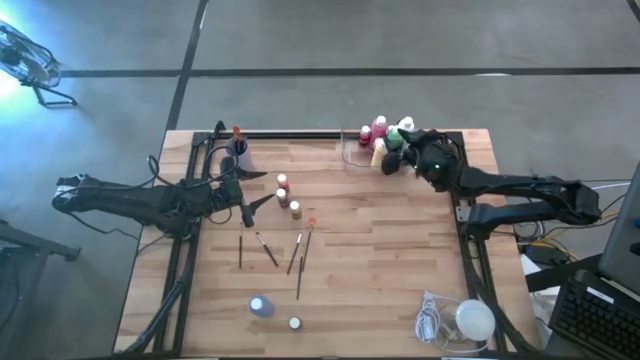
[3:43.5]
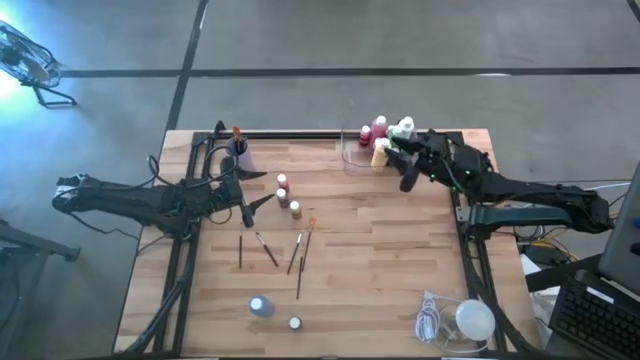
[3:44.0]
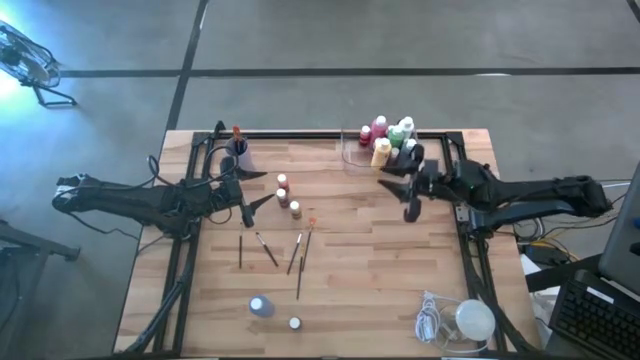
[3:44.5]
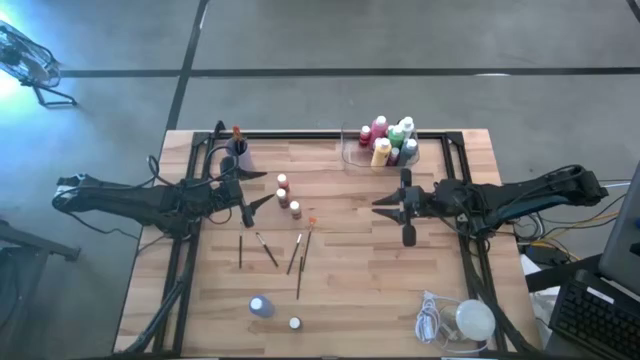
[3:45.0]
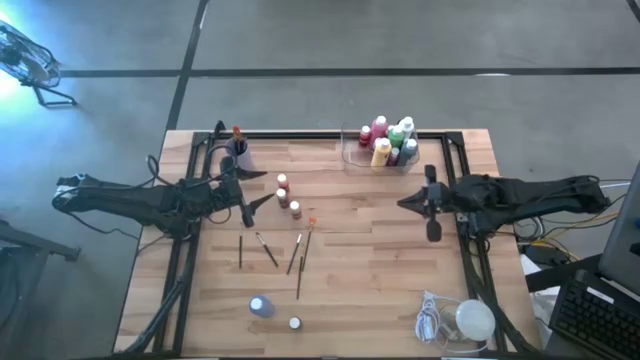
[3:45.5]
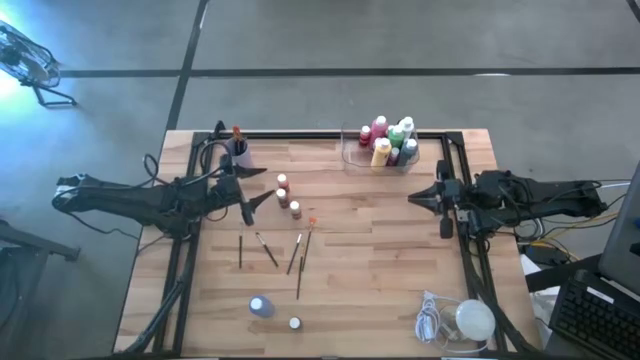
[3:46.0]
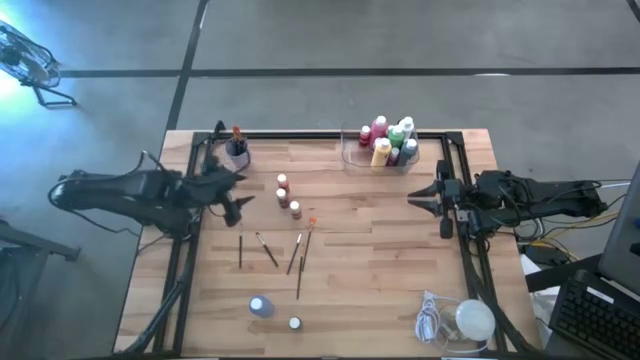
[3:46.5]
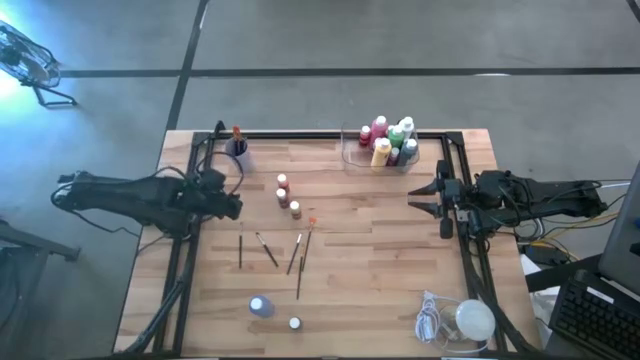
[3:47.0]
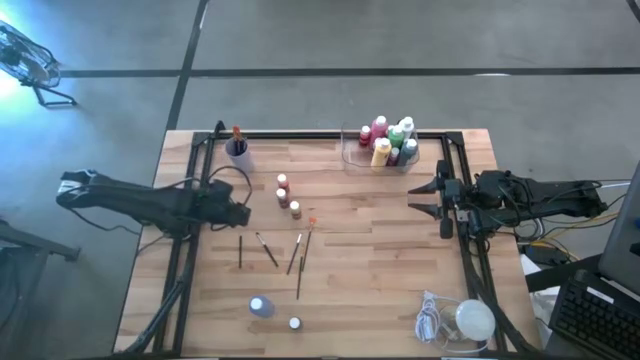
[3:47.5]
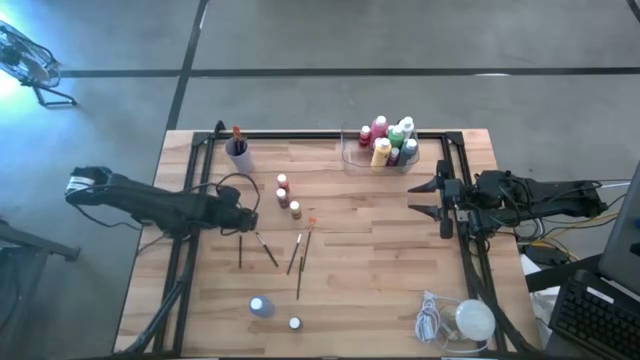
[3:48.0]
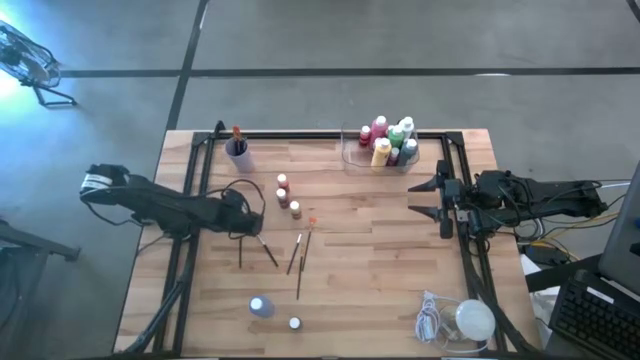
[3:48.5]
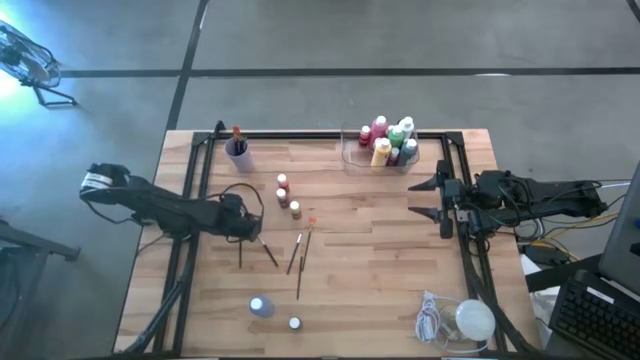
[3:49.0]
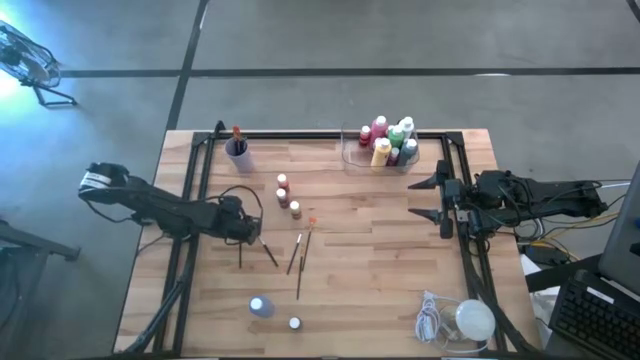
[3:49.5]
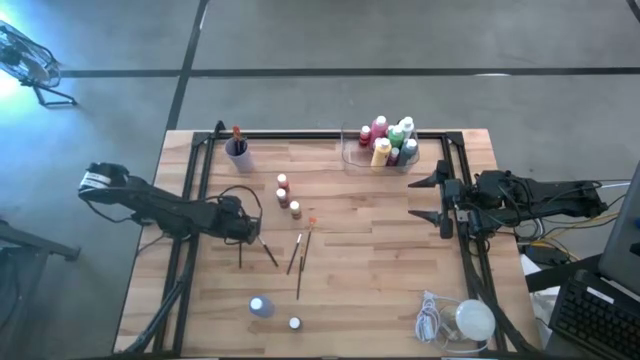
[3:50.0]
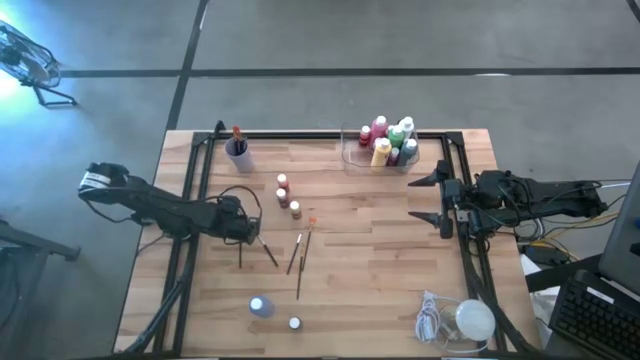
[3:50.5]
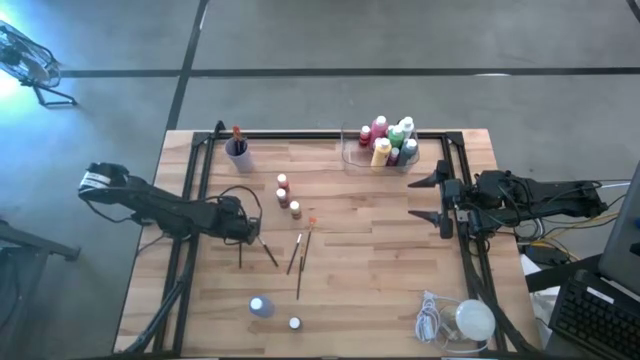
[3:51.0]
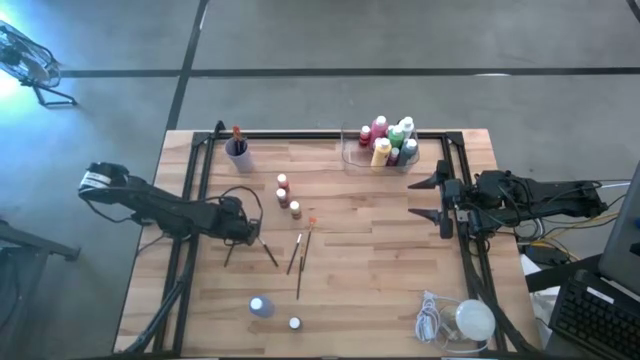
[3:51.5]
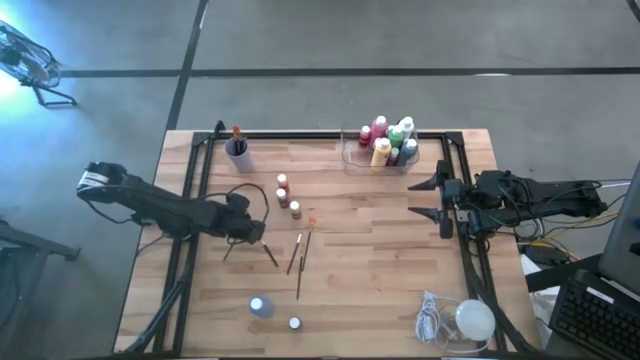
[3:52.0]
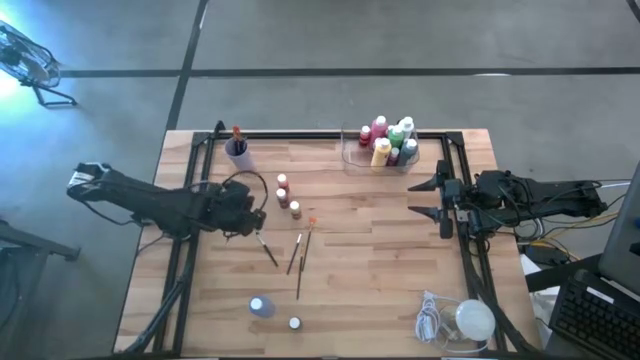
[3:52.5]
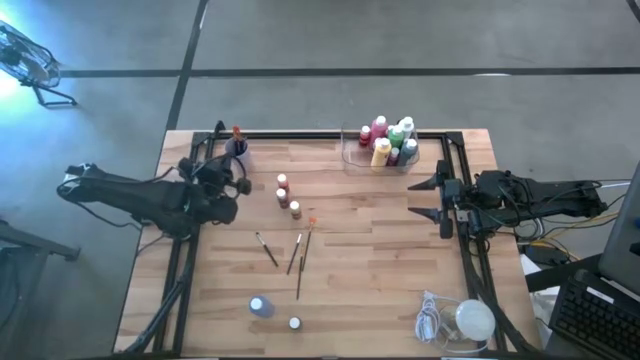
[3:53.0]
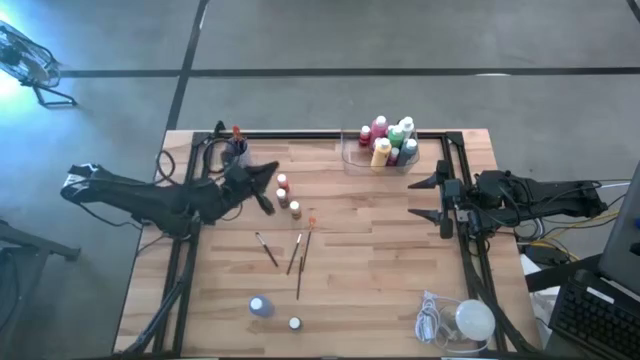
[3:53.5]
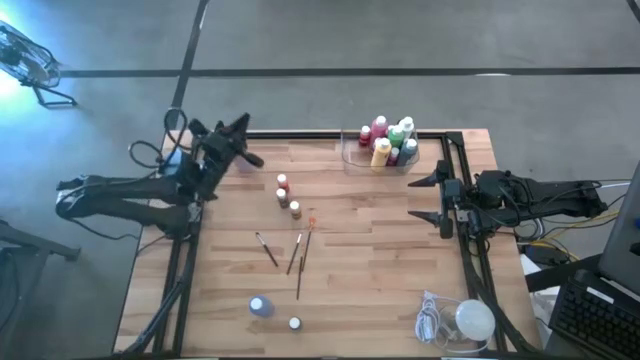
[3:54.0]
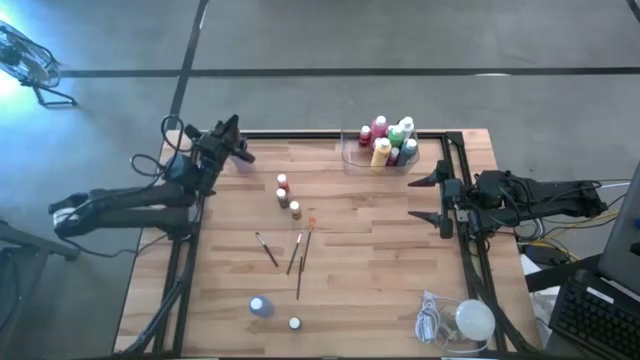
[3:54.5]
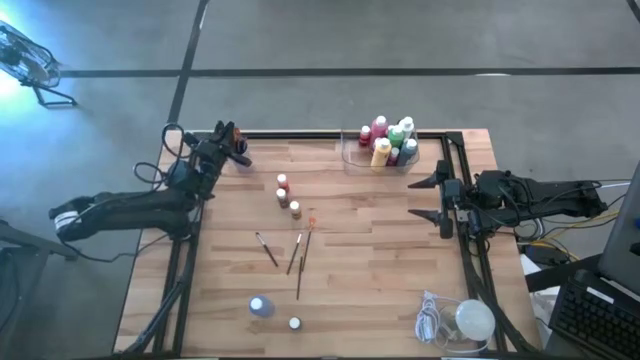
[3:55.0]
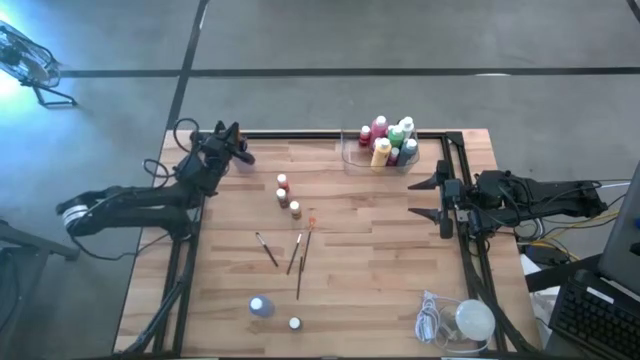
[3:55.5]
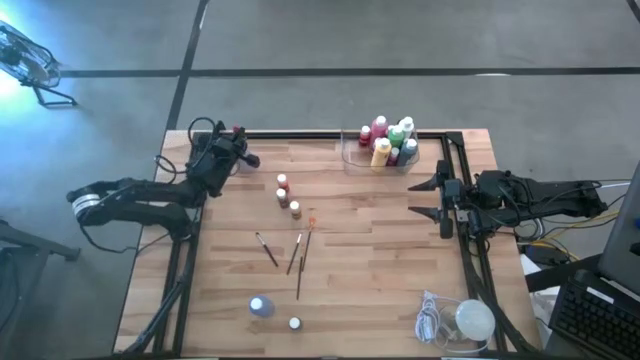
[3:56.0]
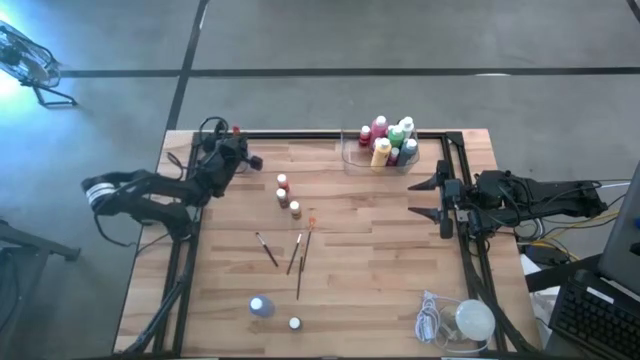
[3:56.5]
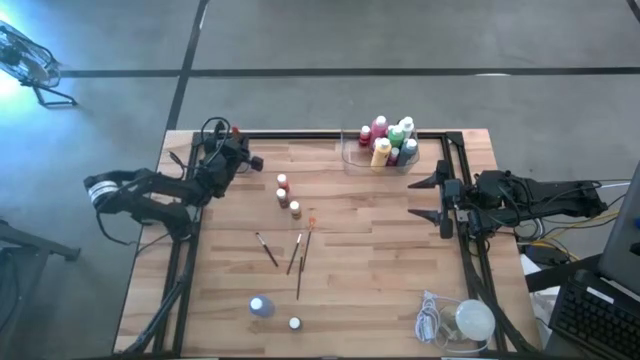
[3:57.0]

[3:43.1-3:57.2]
Task: Pick & Place Paint Supplies
Put the silver paint brush into the violet cup
